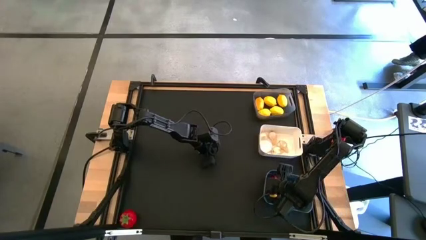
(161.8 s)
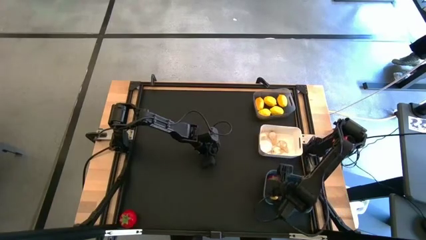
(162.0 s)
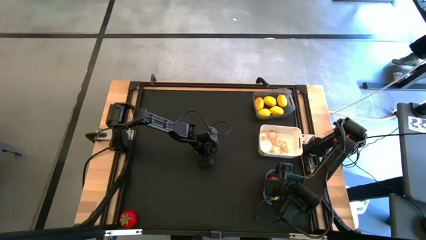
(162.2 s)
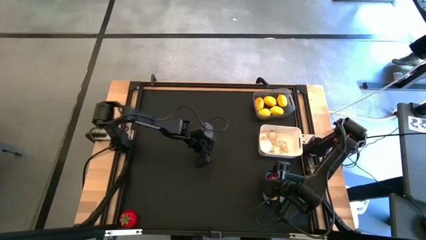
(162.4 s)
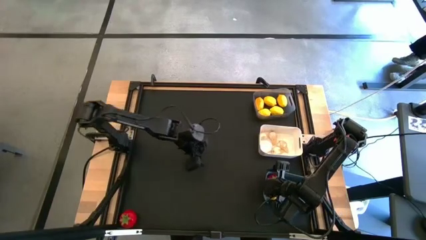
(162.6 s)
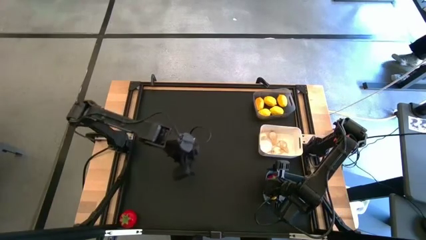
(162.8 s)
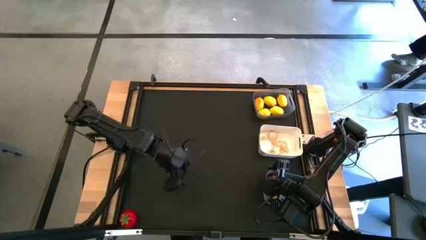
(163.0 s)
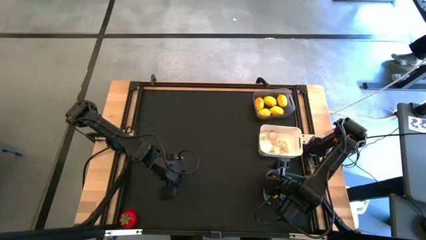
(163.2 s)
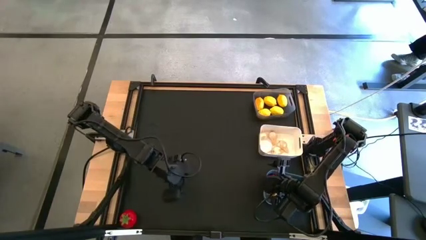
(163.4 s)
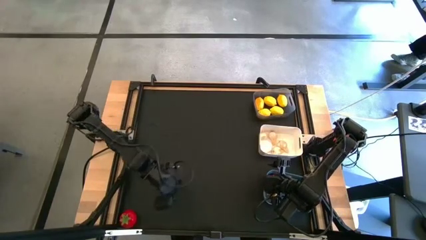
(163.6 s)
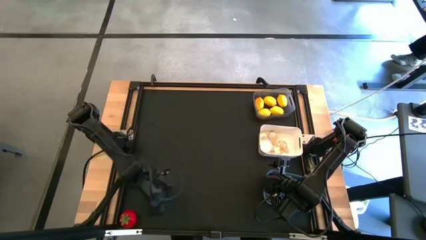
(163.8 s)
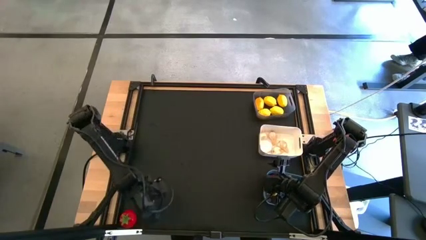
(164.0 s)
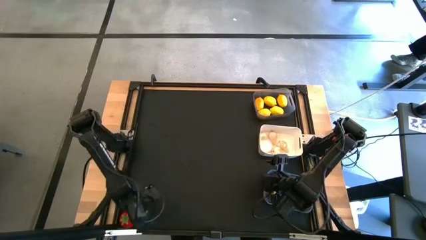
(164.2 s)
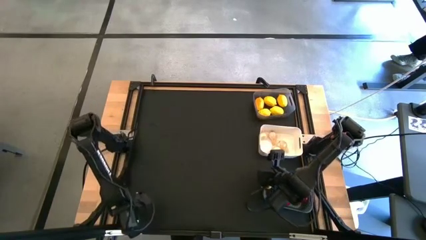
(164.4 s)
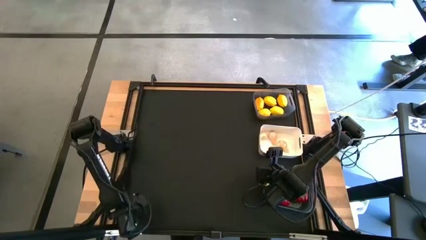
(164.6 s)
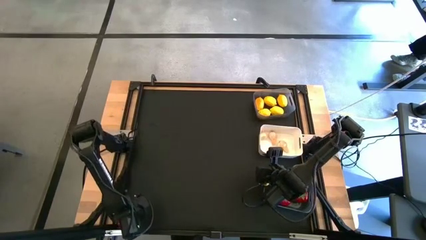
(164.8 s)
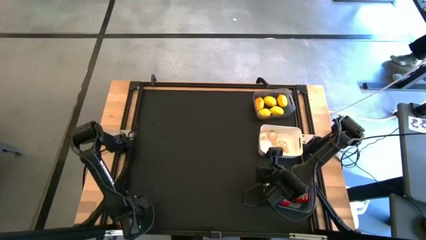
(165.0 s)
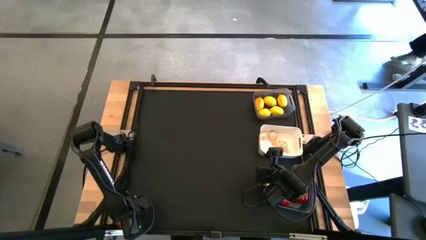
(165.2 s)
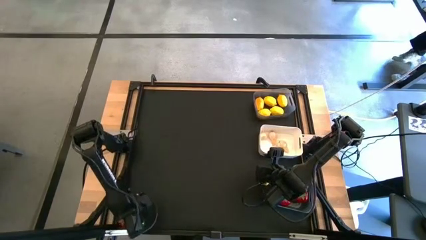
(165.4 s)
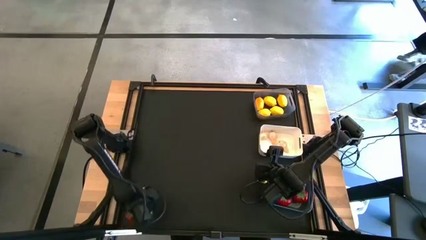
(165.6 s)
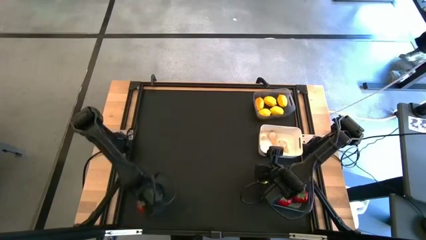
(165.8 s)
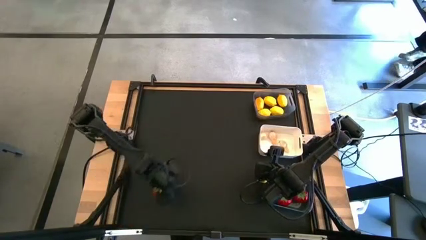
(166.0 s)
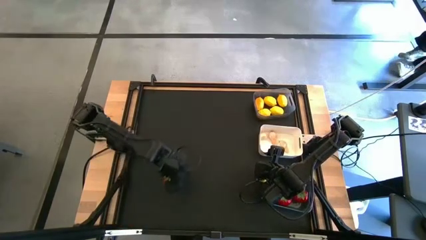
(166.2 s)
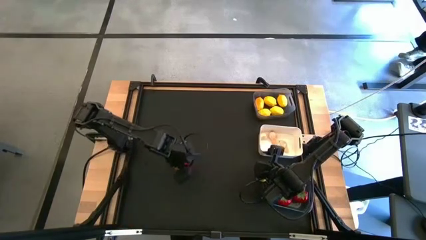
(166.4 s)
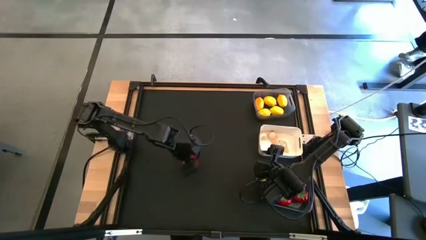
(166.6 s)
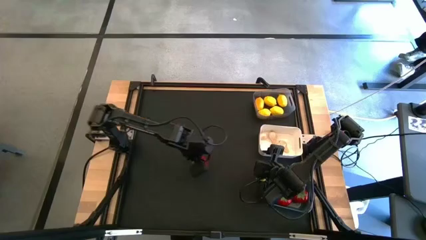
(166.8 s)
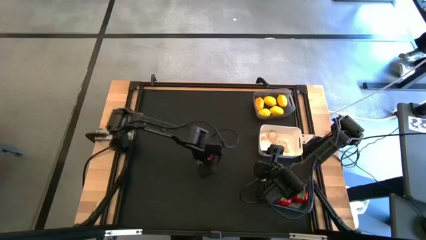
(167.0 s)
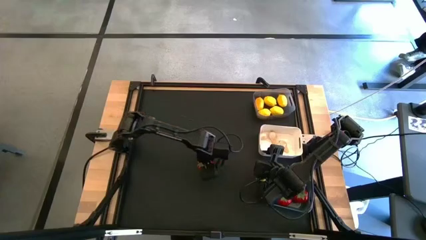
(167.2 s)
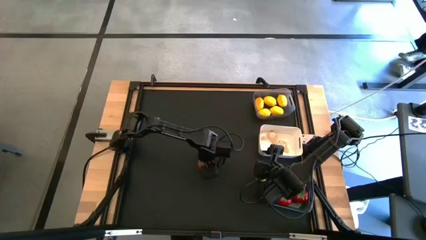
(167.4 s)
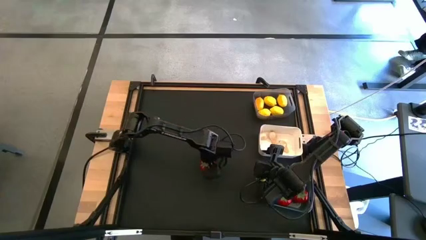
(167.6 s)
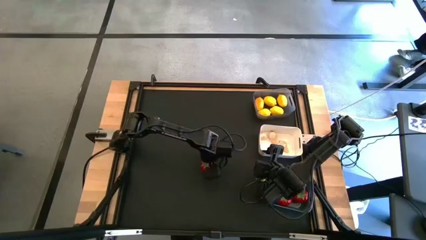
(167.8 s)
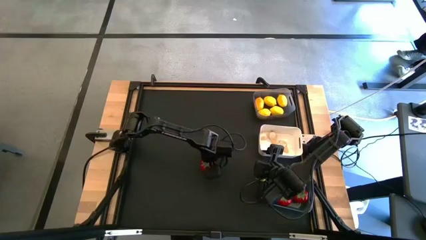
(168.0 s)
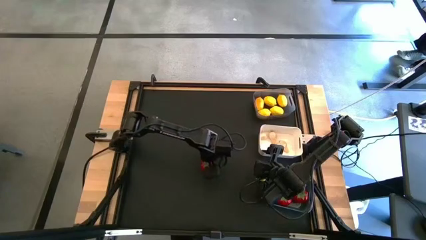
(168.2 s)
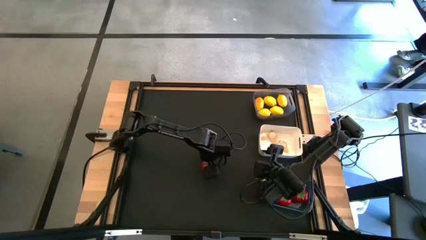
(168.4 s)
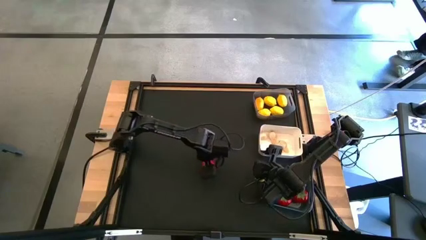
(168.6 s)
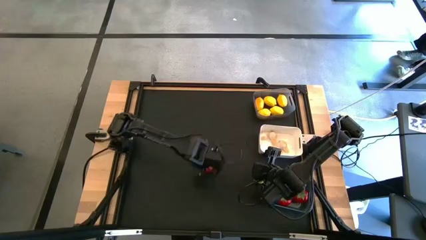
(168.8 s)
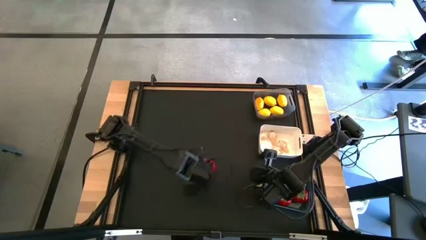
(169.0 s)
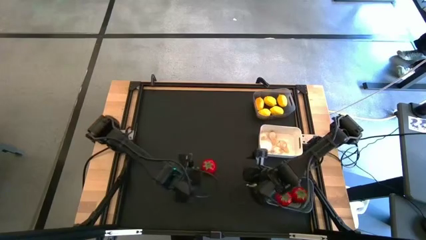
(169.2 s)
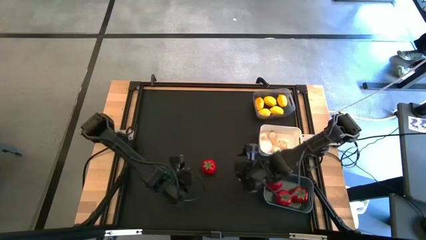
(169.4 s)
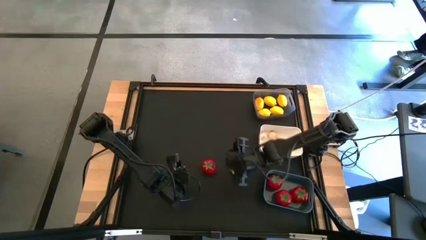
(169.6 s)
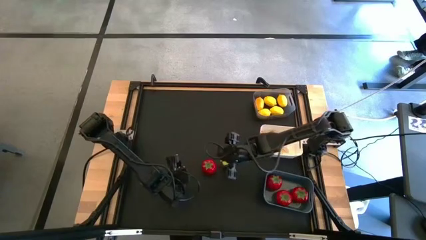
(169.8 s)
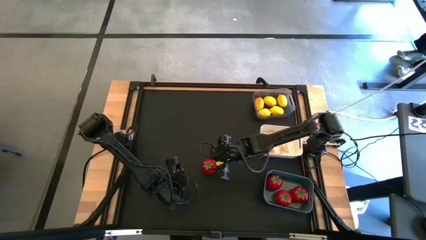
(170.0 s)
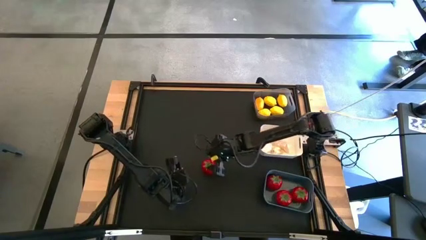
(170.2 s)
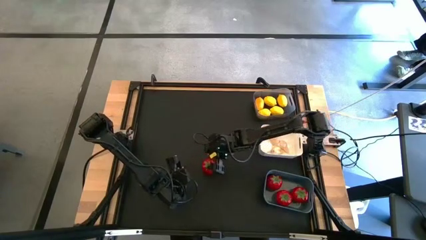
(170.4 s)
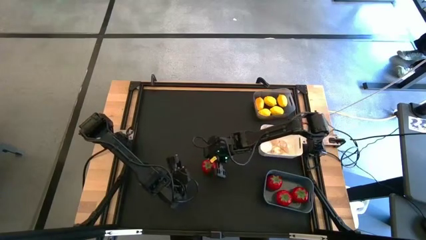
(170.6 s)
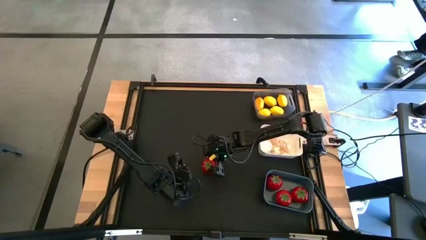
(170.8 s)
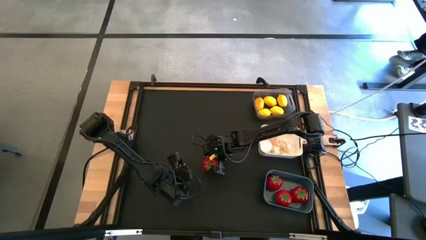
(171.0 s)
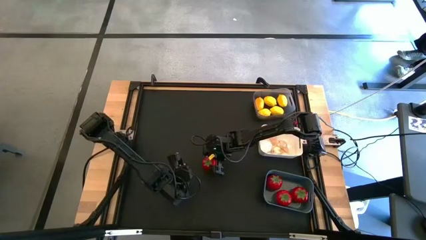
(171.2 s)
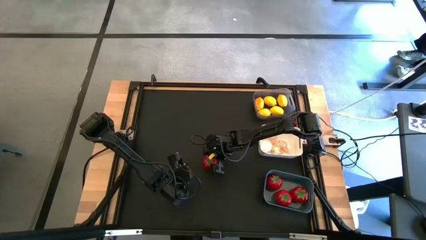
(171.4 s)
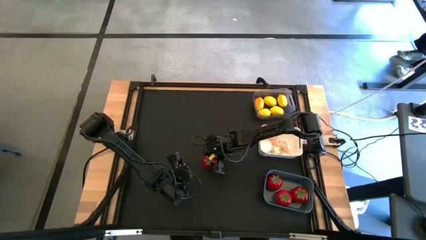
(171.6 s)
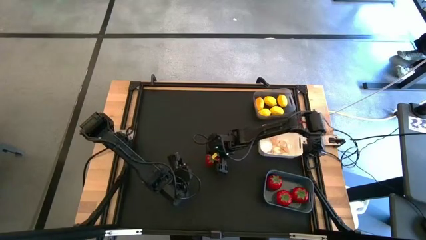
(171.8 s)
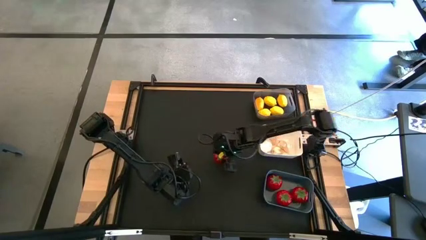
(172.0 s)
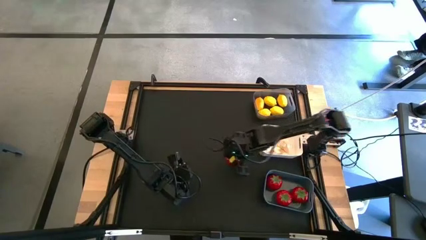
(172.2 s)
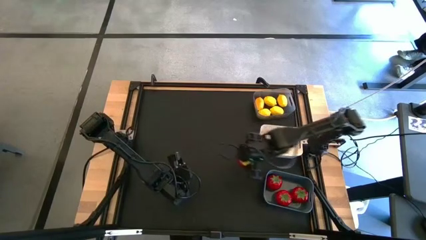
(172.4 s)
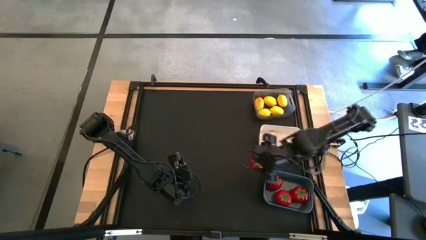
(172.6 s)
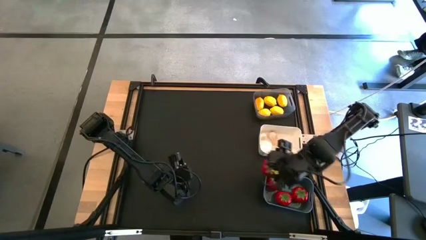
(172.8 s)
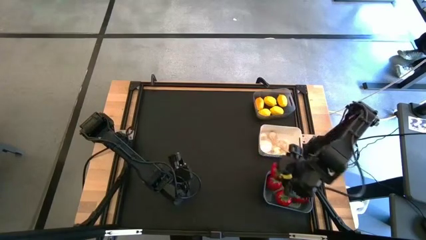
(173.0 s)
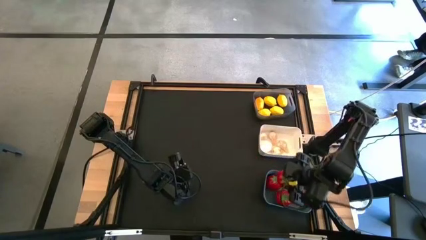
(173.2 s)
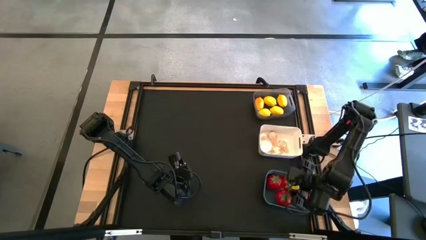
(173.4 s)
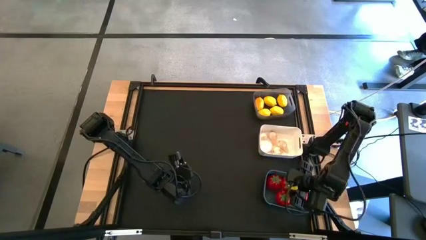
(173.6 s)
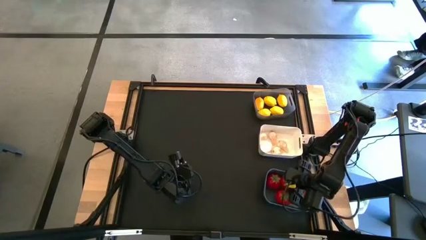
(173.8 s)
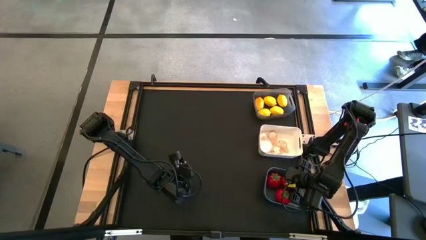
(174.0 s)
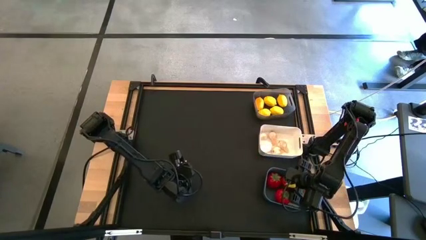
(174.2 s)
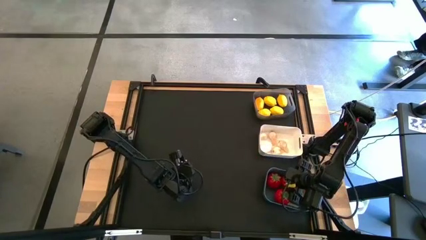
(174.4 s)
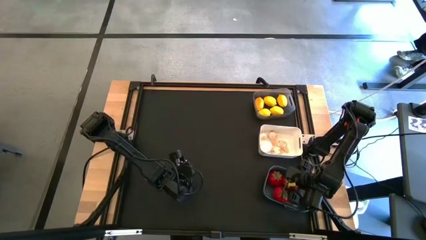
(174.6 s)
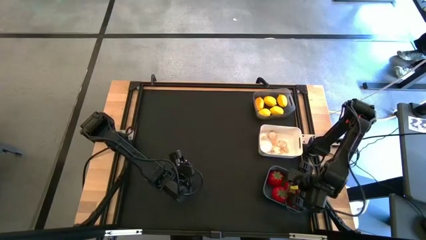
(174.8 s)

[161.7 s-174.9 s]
Task: Sort produce into baskets
Put the tomato into the the blue bin

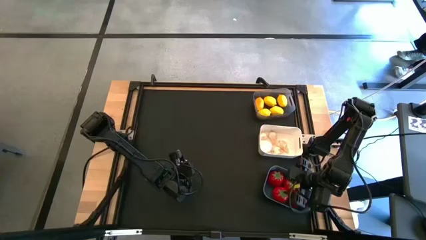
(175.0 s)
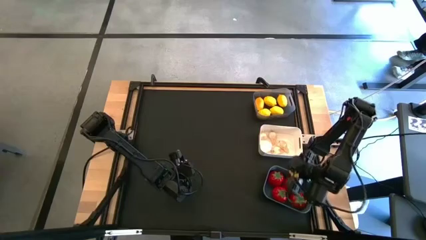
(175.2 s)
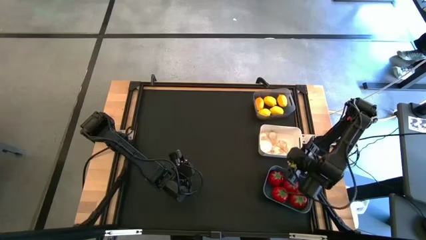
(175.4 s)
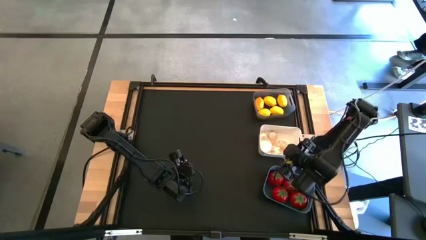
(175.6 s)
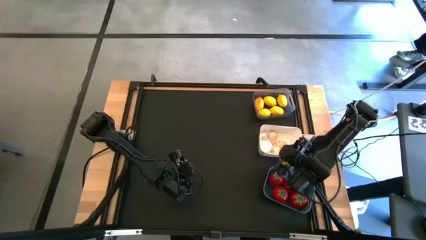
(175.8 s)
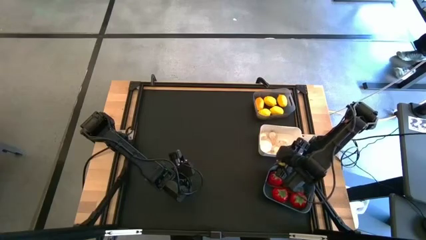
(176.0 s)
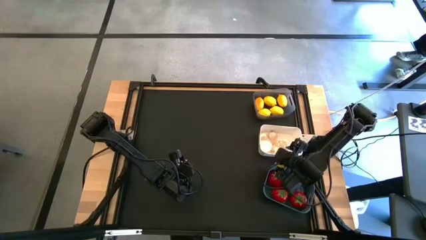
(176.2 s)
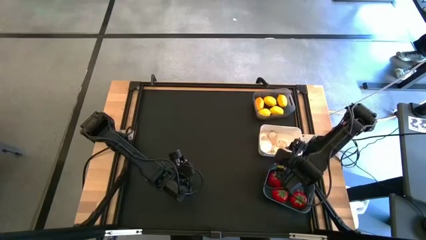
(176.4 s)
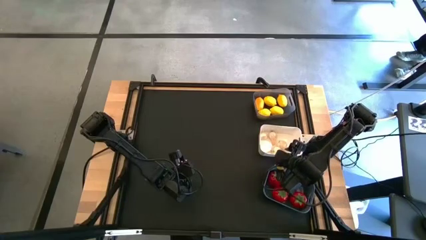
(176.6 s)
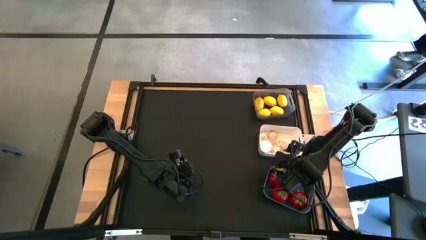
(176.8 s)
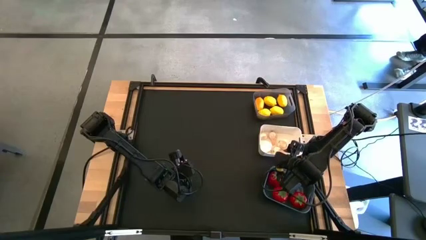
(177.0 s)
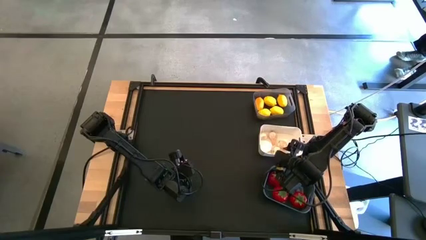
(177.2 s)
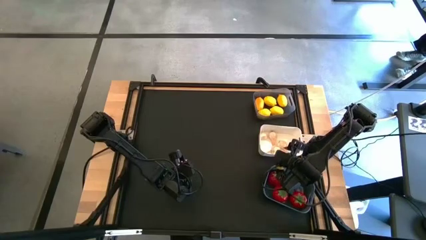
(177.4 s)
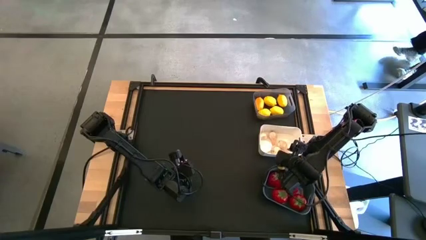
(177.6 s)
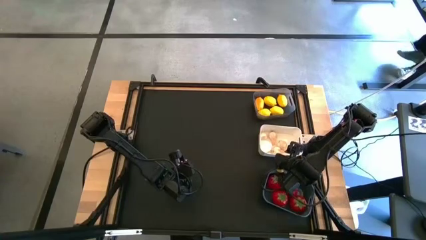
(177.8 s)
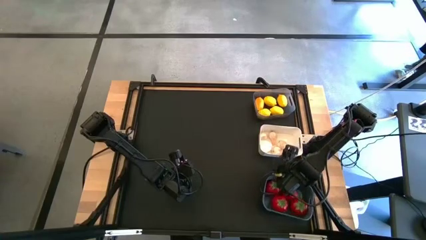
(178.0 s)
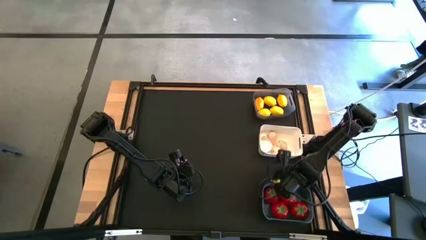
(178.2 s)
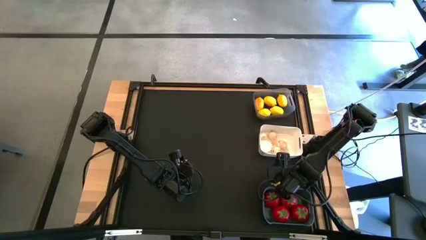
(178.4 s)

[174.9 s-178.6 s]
Adjust the blue bin
